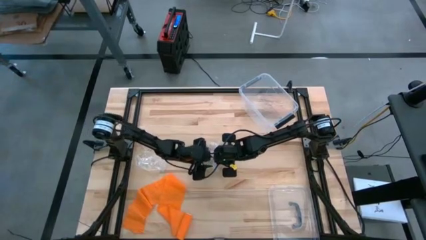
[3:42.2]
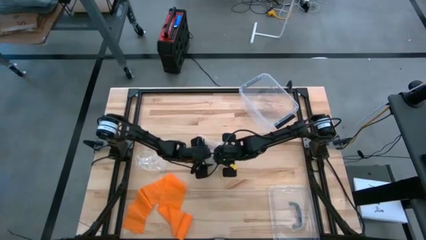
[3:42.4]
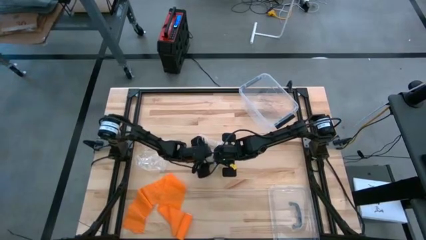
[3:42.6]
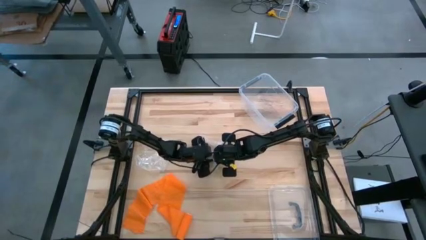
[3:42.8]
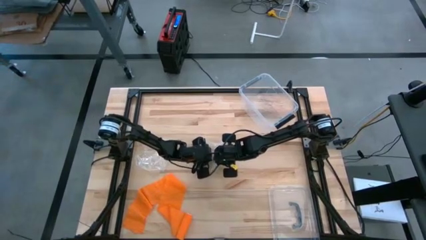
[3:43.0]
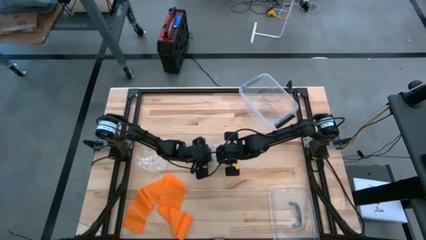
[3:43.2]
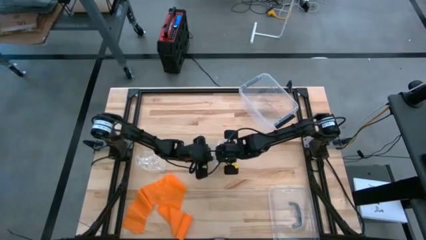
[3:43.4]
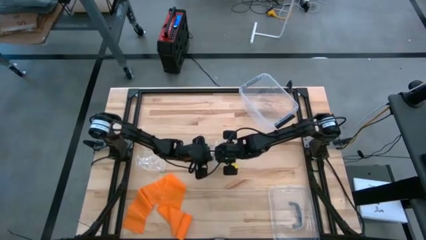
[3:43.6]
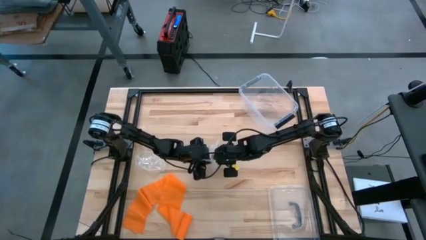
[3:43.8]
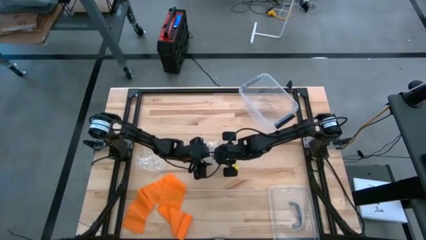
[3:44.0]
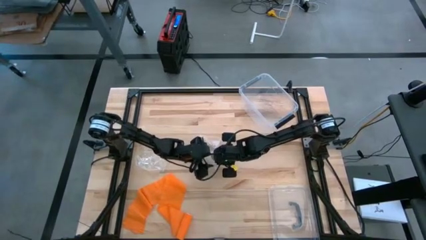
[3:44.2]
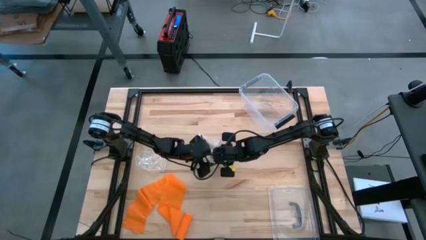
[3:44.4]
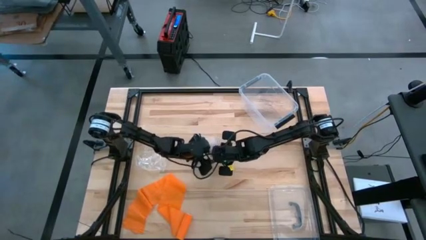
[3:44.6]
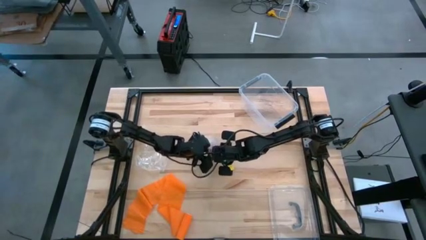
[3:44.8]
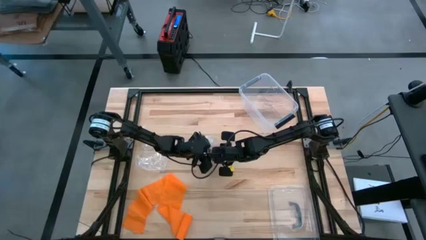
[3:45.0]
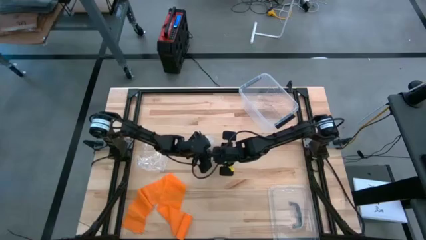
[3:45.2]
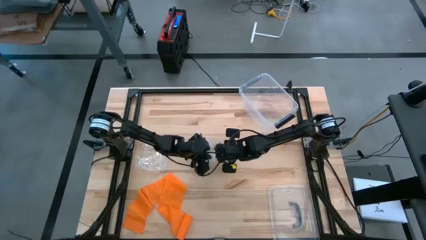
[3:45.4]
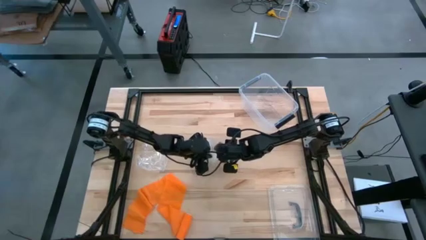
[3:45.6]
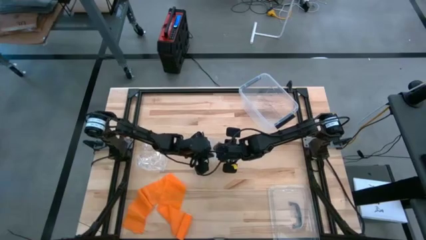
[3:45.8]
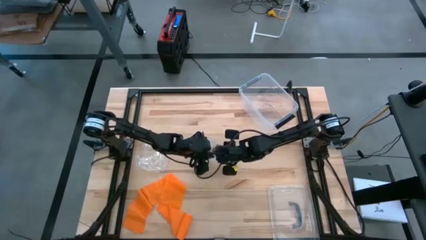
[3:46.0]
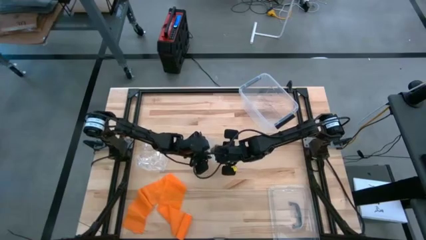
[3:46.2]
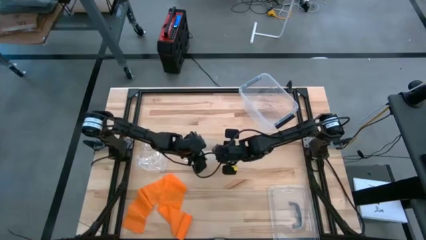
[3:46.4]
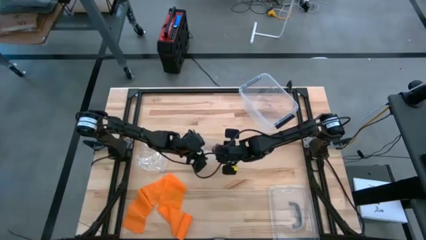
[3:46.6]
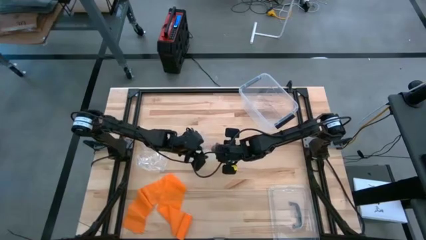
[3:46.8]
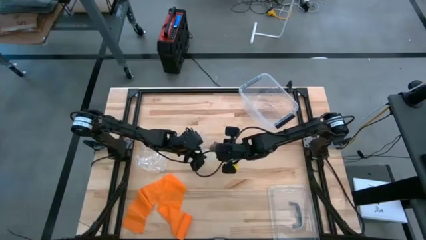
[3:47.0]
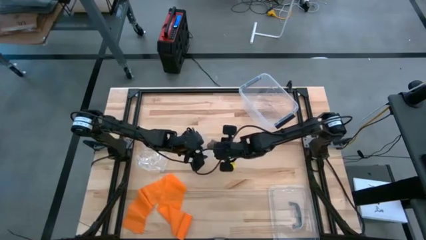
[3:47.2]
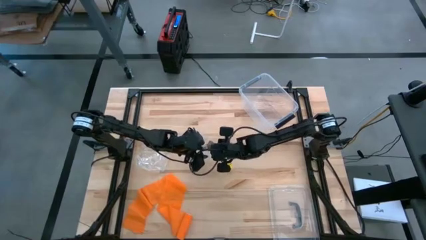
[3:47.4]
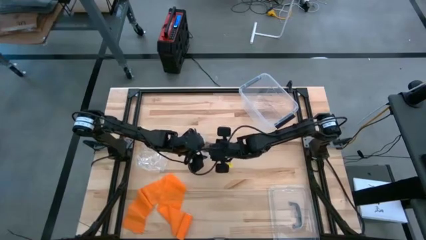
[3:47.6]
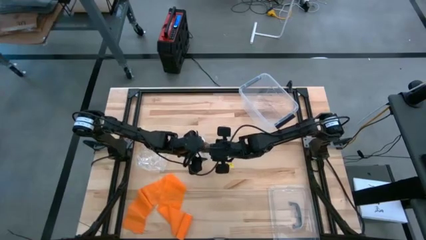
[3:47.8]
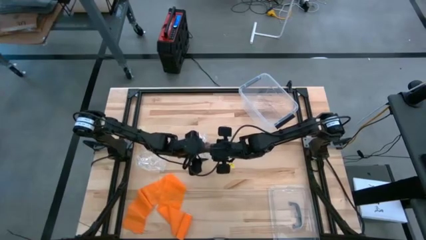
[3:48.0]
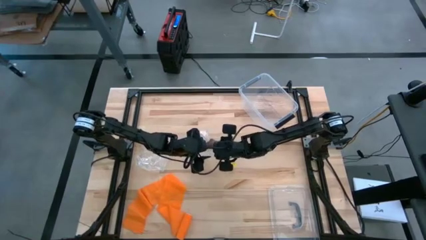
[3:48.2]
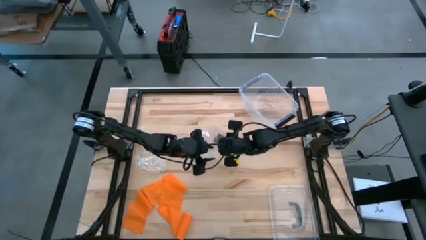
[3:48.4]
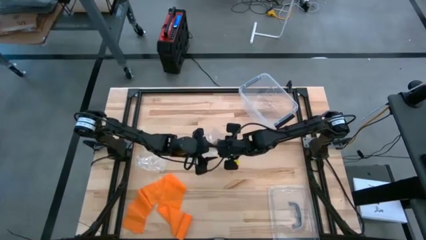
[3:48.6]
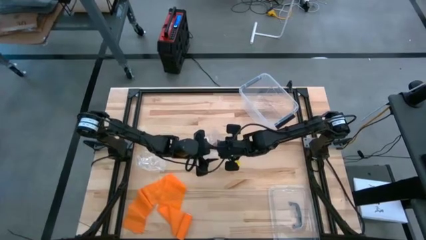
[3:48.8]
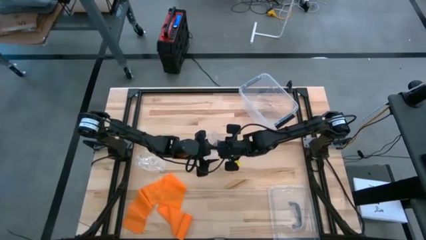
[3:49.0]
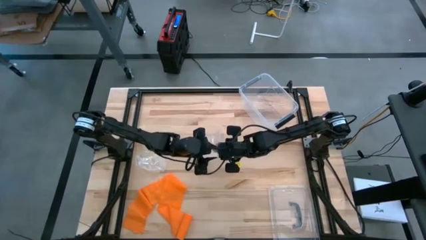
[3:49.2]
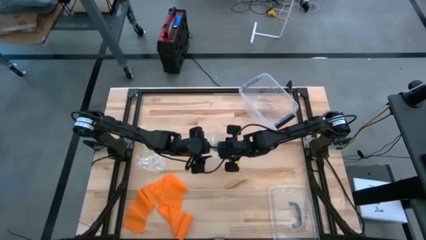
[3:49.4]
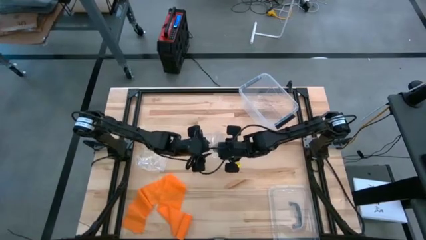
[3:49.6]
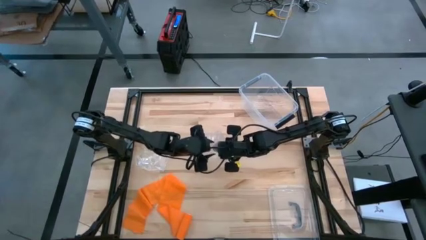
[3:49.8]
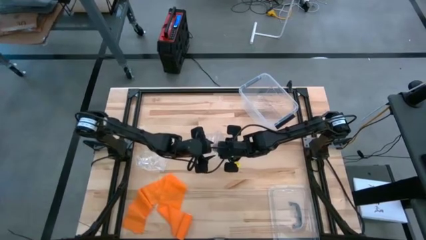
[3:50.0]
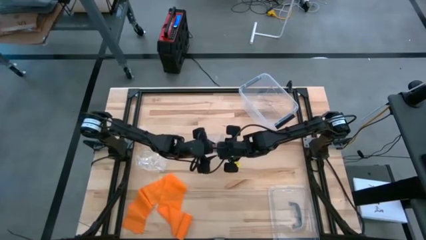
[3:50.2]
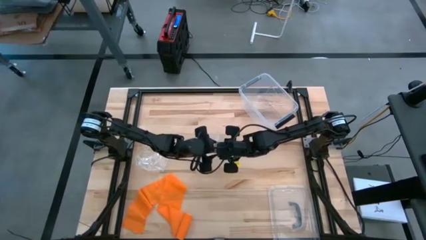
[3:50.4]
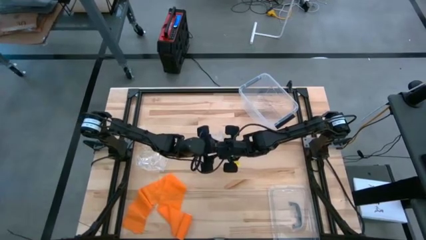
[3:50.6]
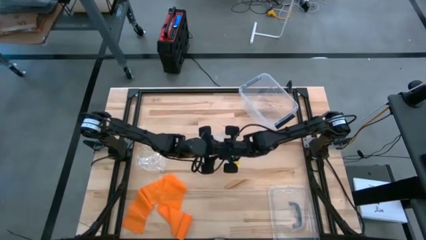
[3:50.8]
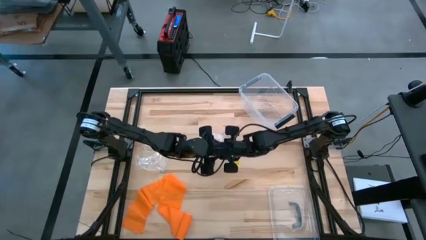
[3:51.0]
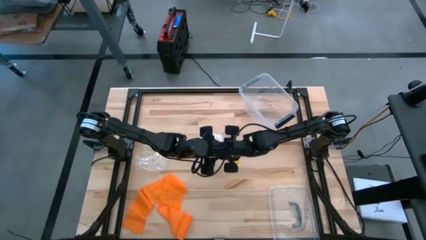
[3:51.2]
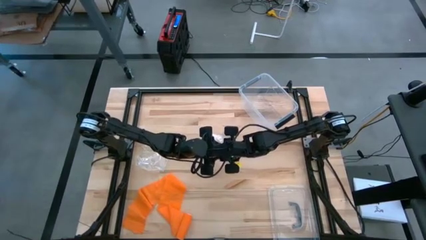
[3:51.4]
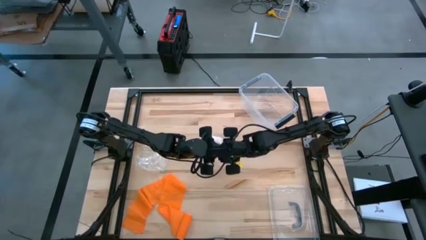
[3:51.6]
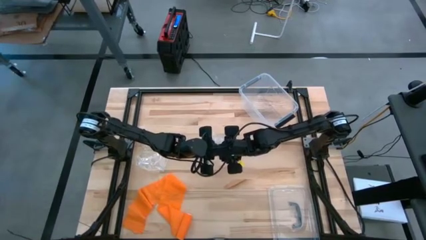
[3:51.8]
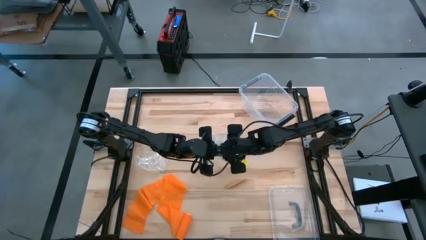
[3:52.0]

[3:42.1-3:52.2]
Task: Roll bandage
Put the brown bandage into the zip bag

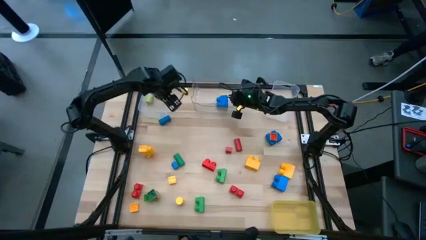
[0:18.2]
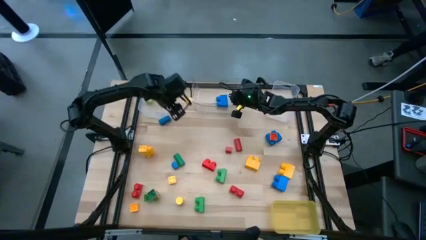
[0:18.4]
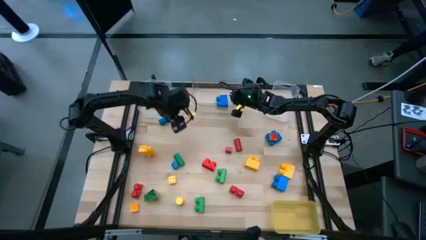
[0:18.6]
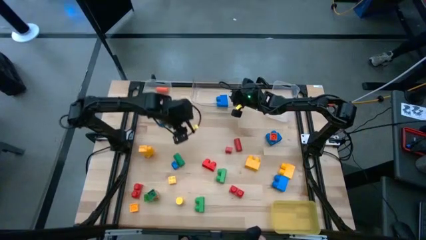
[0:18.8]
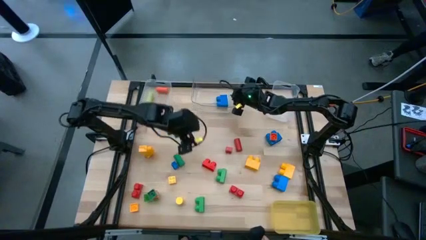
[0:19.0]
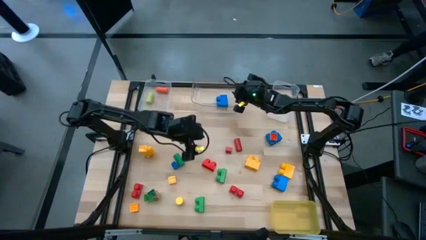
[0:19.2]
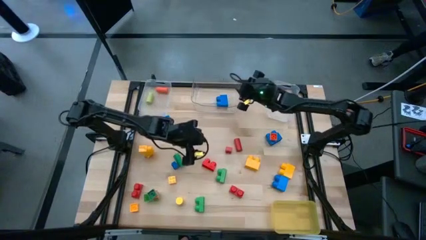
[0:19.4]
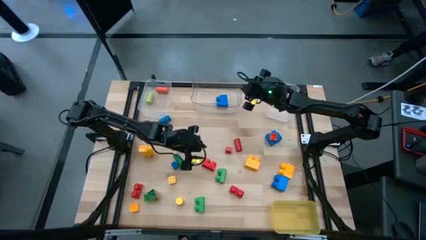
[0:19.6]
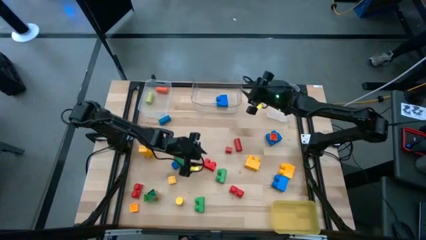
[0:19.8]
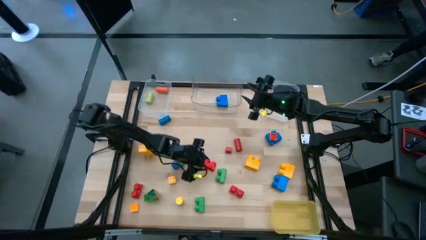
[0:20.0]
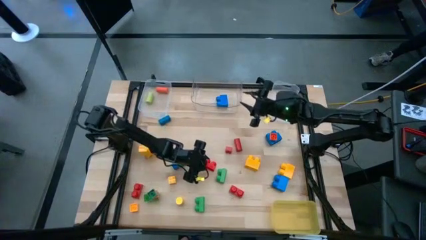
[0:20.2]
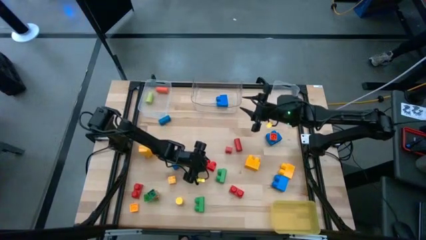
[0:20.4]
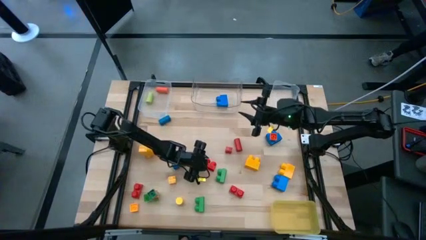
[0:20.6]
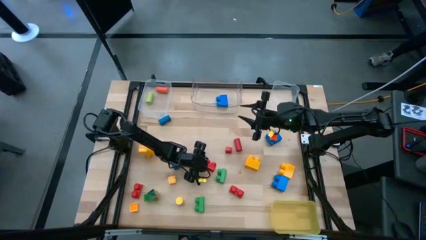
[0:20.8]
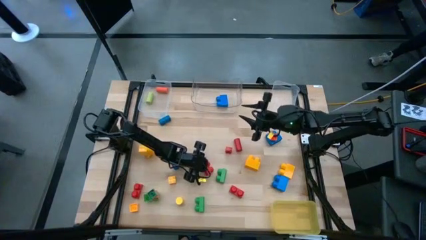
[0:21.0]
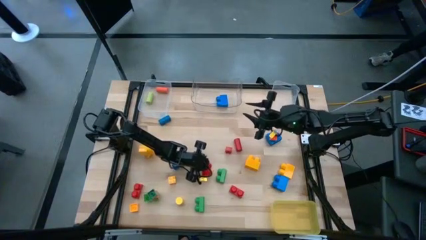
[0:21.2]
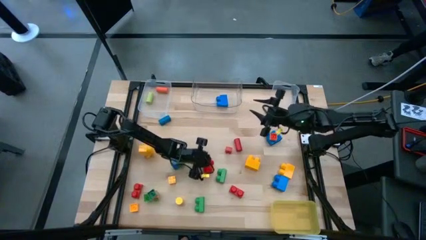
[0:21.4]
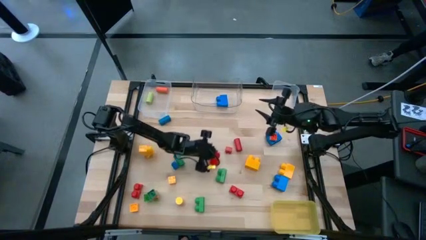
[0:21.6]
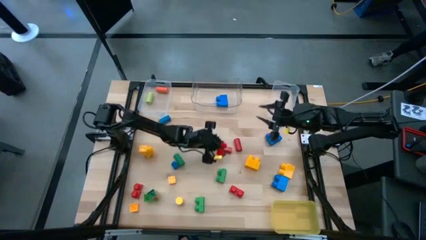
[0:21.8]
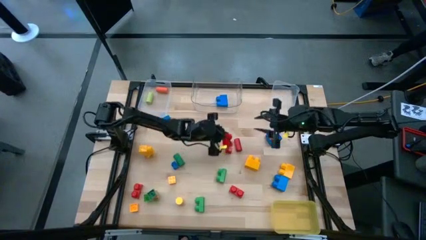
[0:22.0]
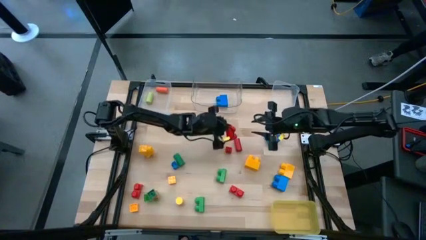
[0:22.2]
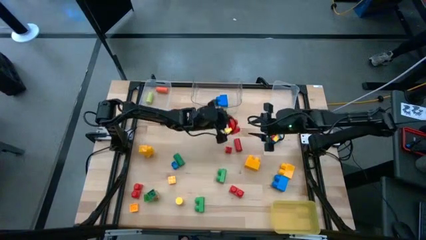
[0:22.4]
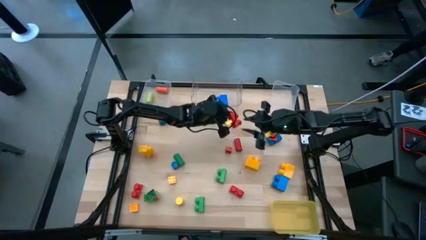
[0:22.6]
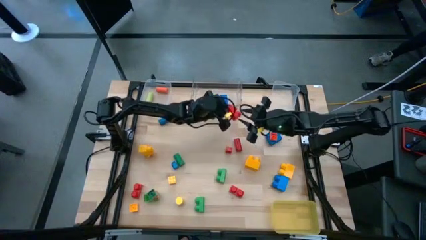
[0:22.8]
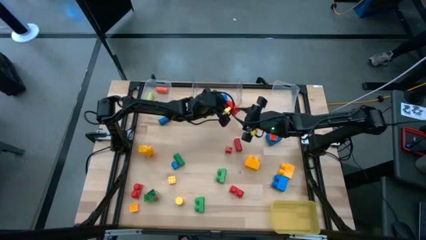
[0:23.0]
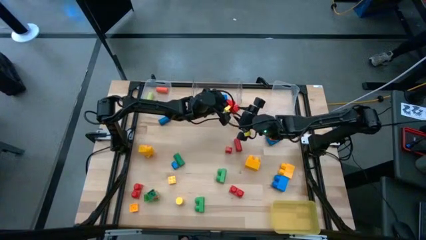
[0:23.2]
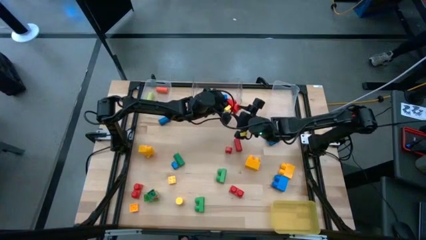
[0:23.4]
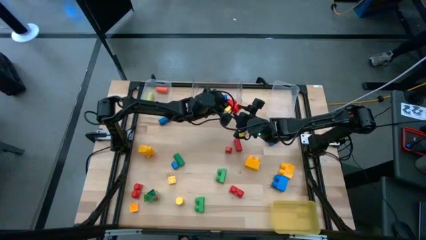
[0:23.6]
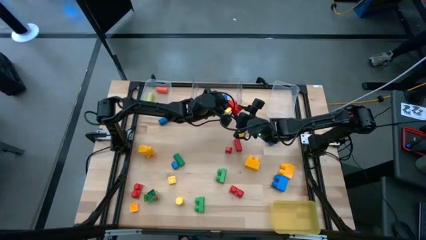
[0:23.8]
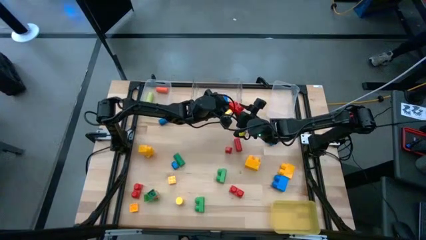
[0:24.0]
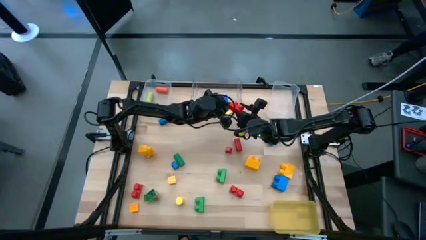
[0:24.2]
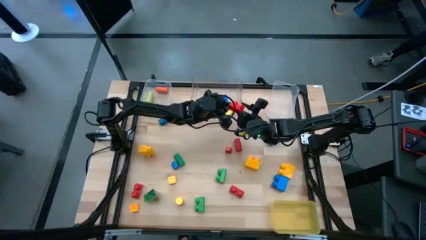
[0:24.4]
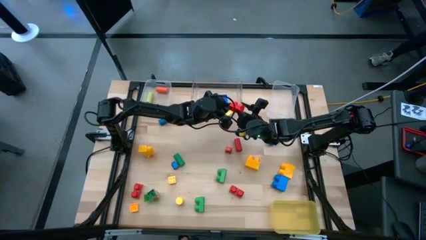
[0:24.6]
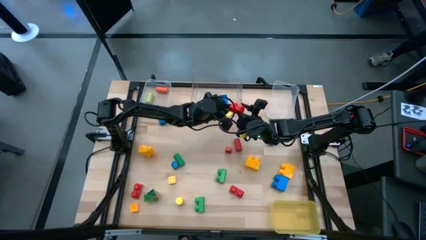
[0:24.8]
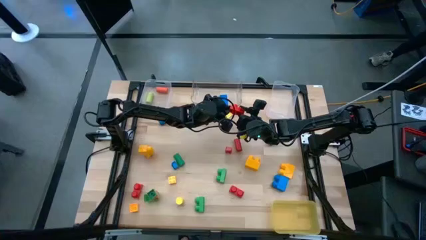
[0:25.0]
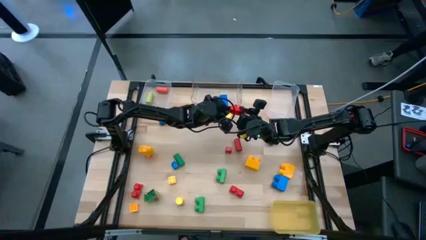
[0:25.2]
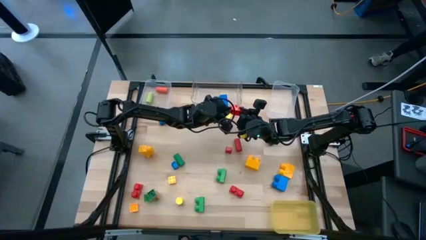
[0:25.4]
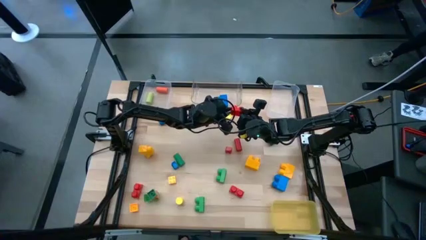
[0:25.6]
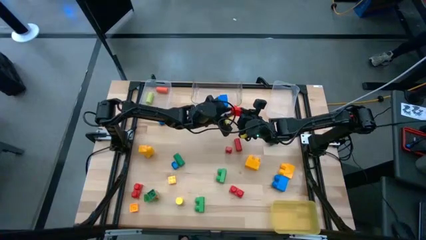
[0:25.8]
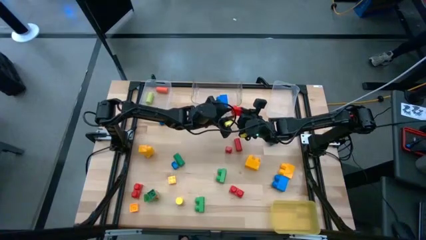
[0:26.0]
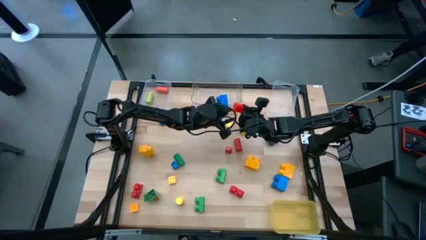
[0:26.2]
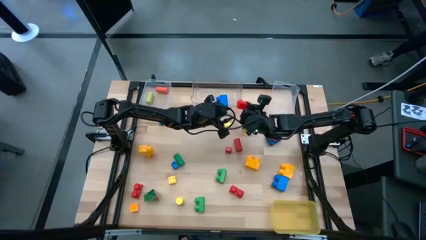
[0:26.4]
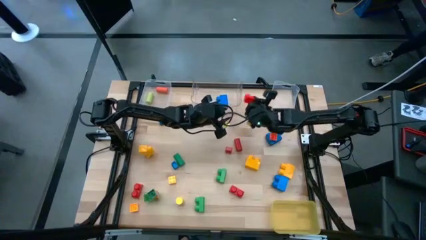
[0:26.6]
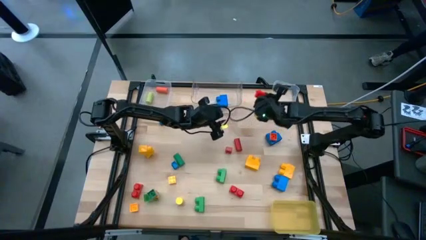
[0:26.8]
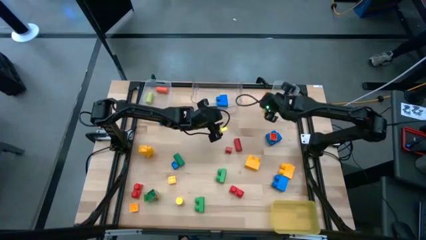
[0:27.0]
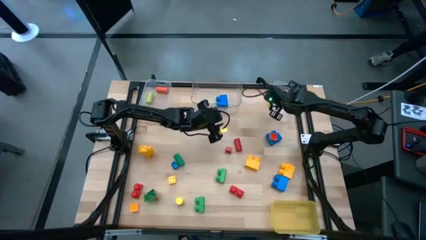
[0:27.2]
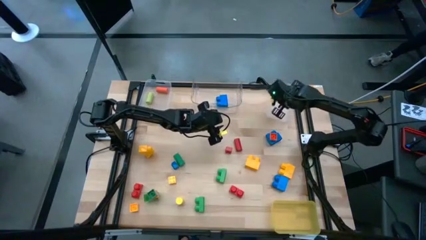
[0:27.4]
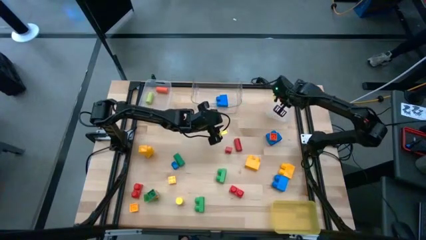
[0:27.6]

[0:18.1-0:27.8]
Task: Sort blocks by size
Put the medium red game piece into the right transparent bin
